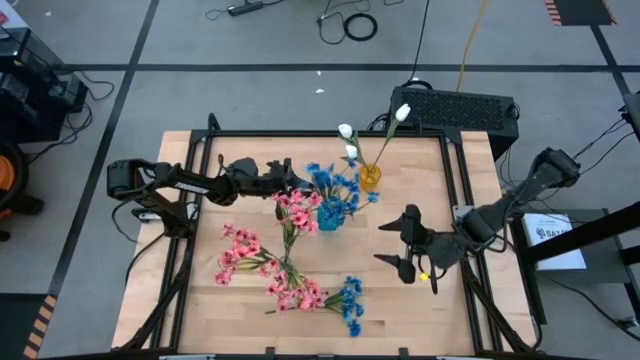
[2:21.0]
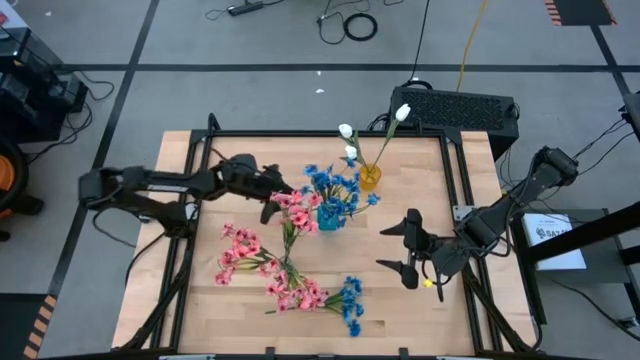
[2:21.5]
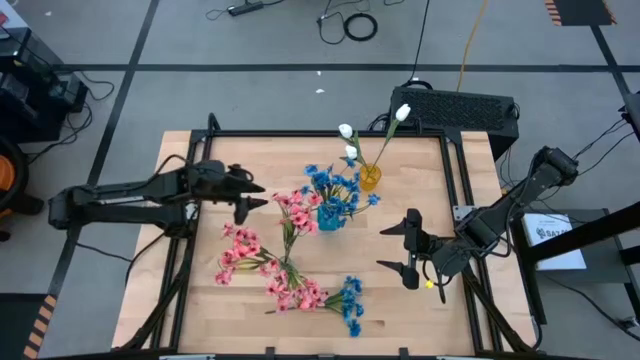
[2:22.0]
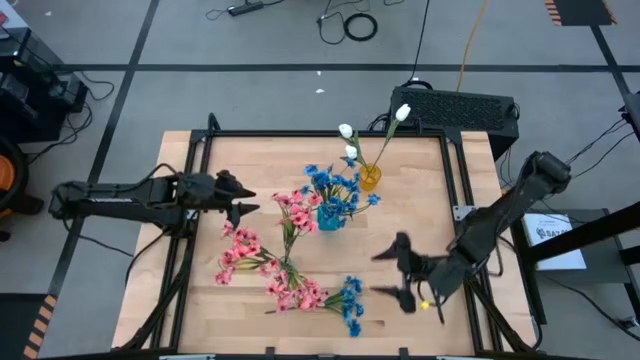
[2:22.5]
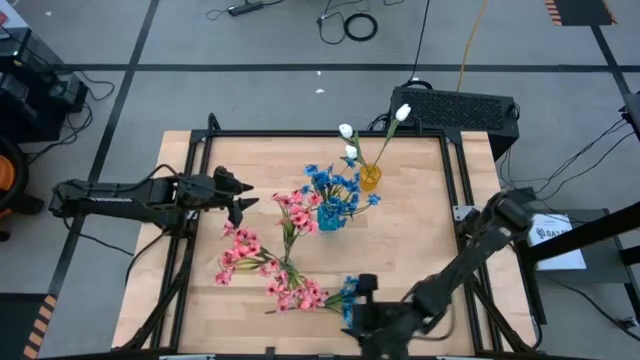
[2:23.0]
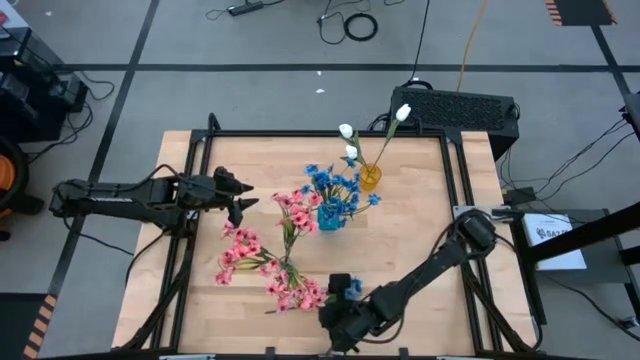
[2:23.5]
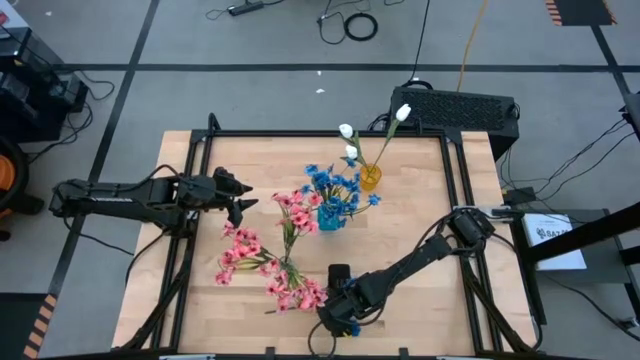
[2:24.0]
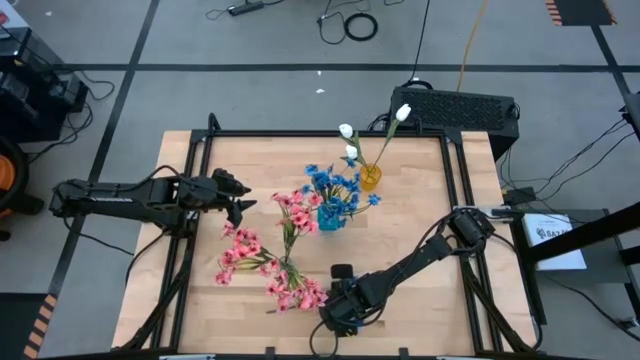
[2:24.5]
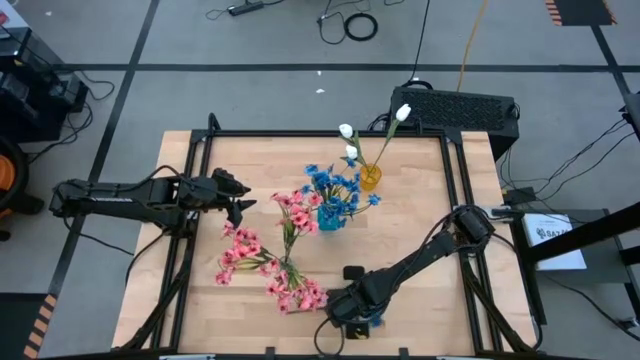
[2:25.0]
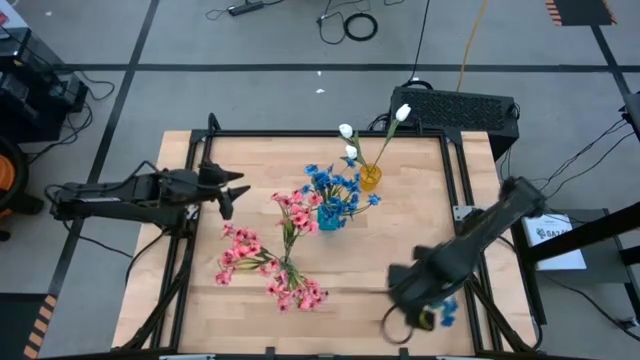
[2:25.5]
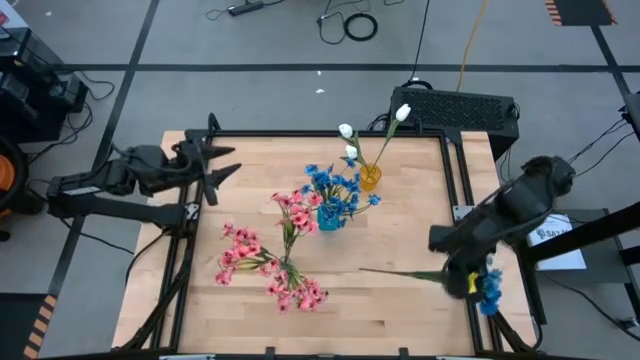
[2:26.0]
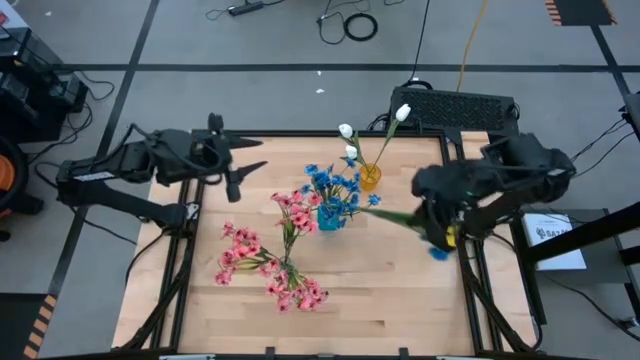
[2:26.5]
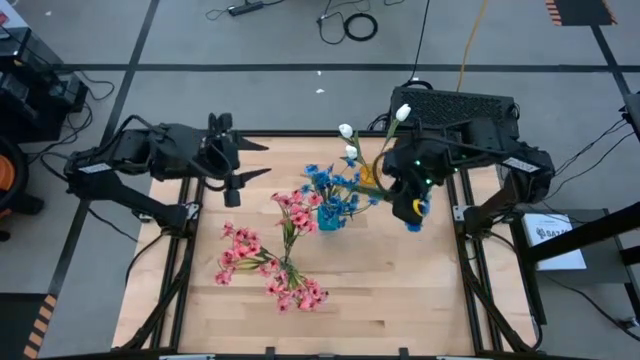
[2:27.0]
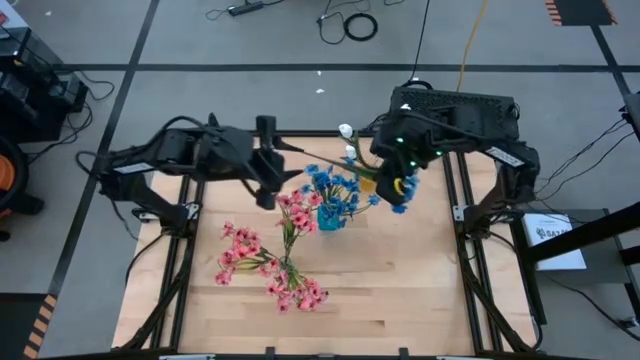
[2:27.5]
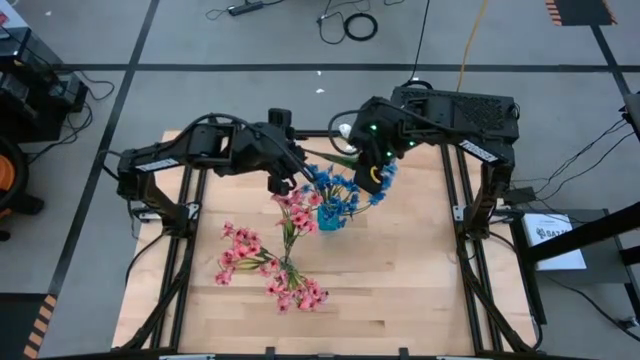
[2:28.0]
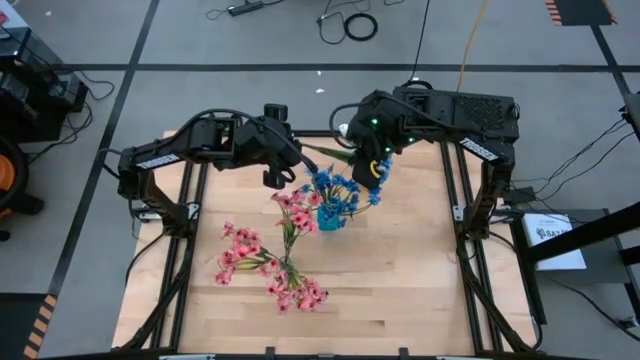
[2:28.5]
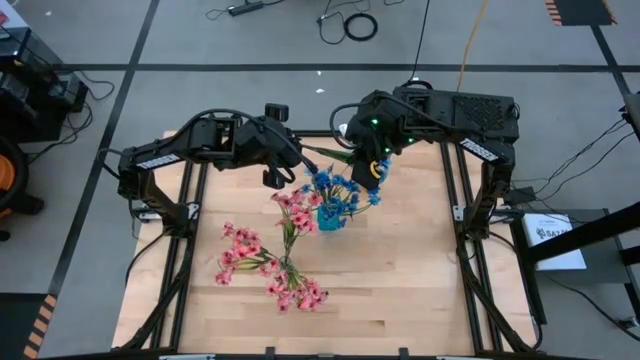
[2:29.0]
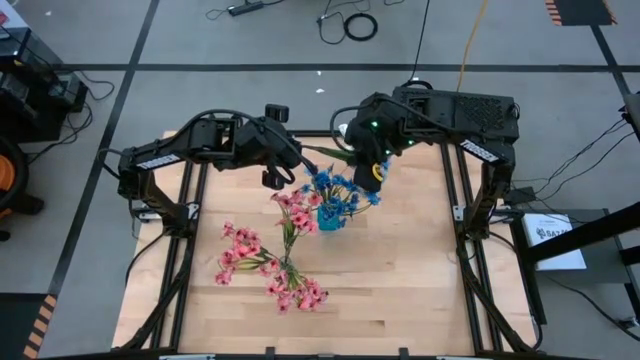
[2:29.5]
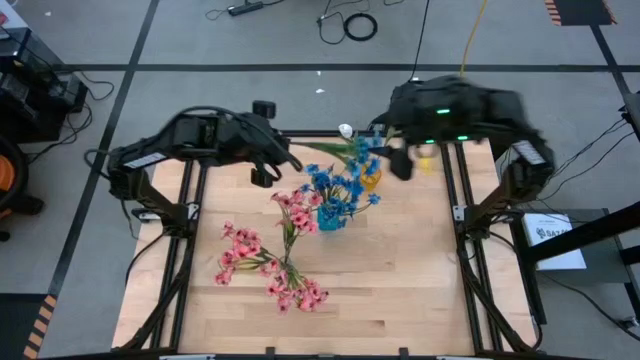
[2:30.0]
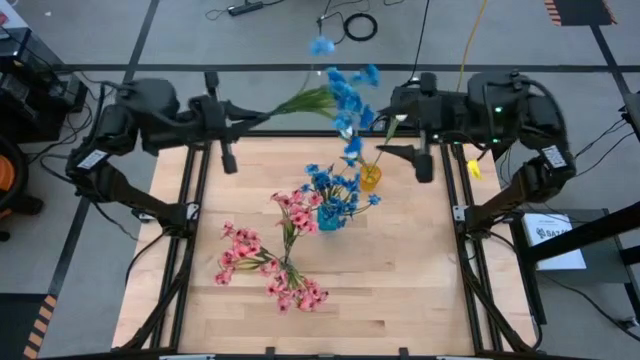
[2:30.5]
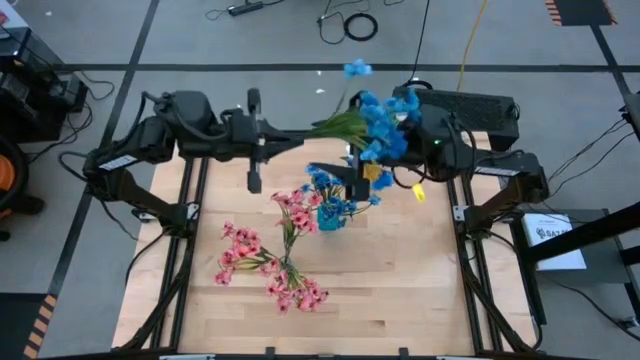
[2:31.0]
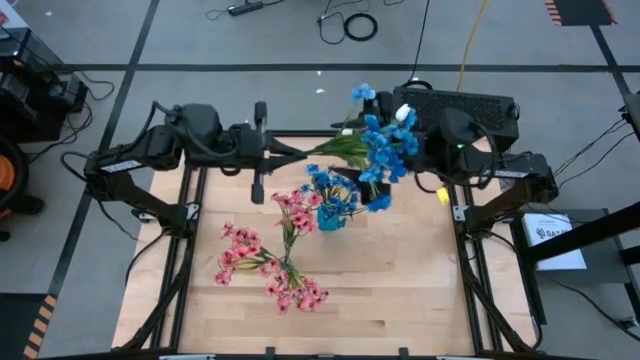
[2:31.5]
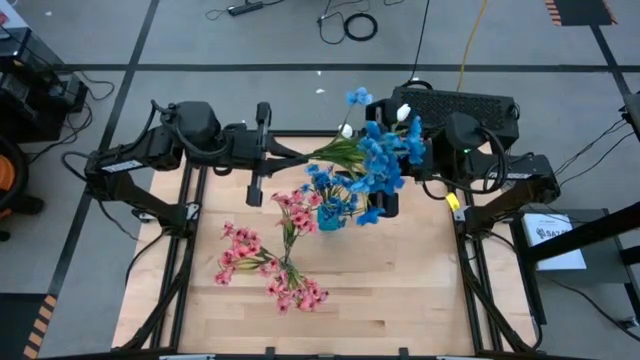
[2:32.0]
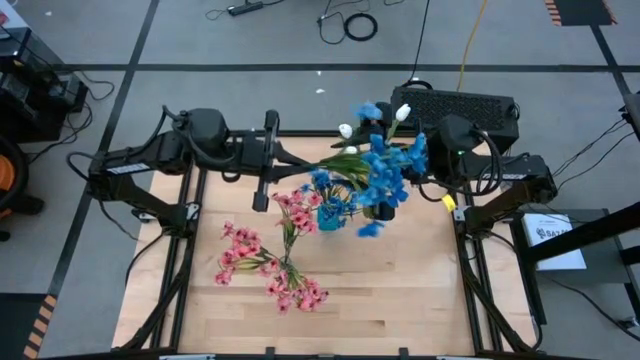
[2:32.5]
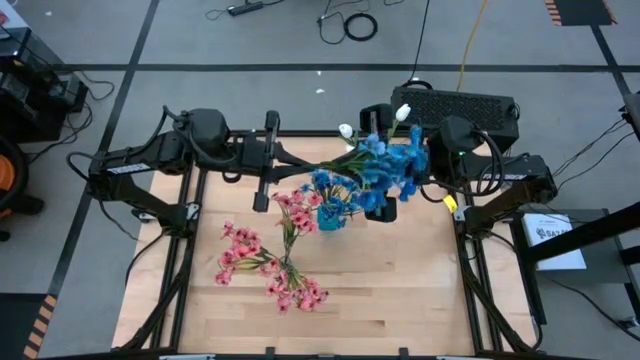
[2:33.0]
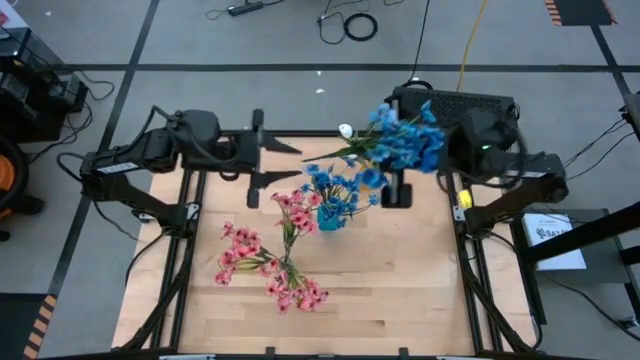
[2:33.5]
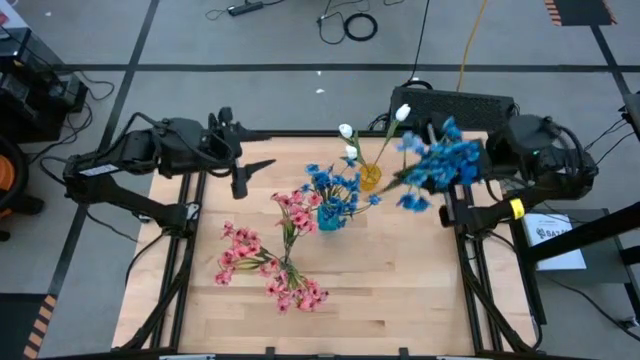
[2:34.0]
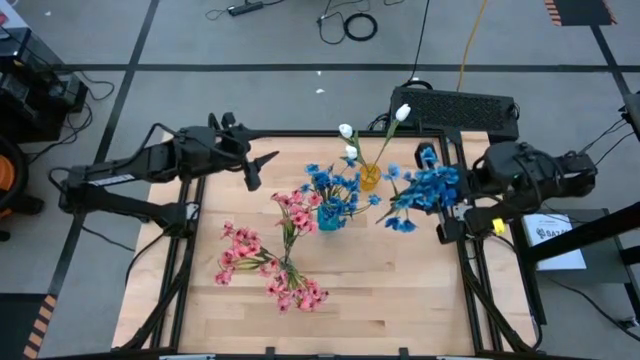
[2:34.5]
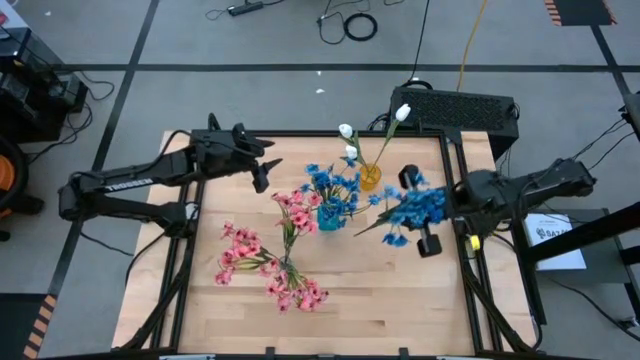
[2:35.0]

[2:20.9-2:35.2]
Task: Sort flowers into vase by color
Put the blue flowers into the blue vase

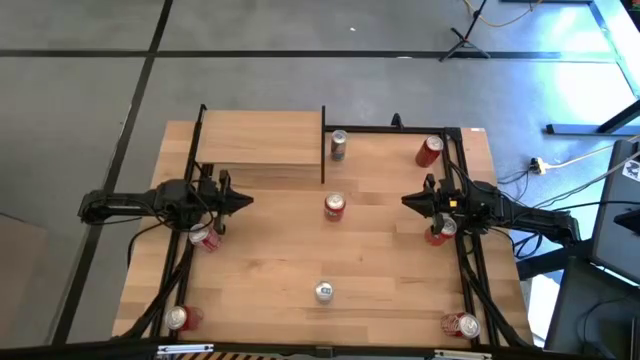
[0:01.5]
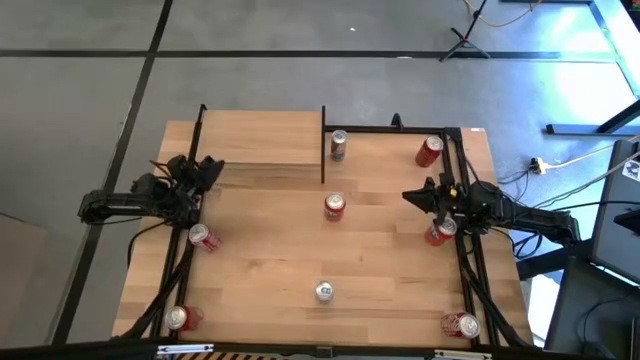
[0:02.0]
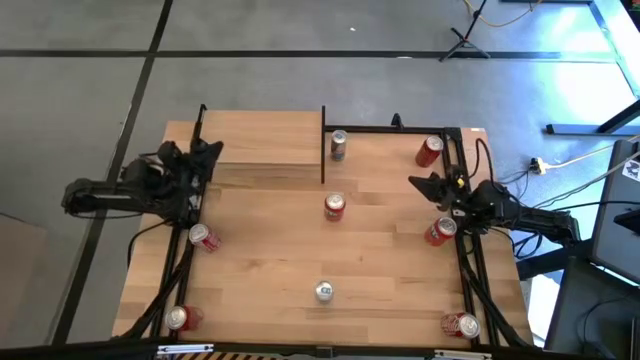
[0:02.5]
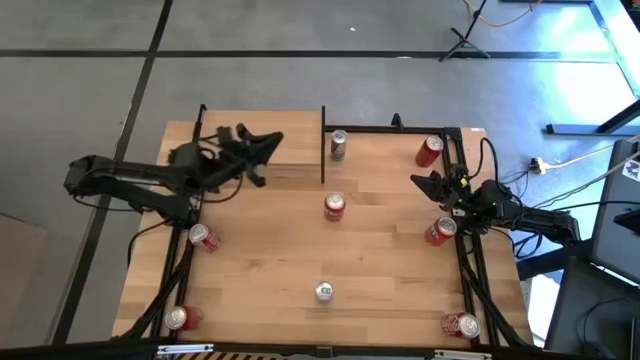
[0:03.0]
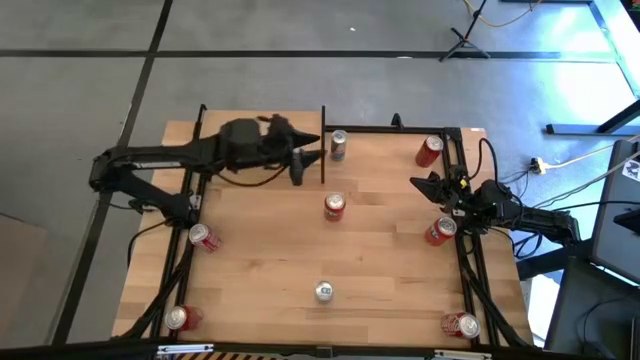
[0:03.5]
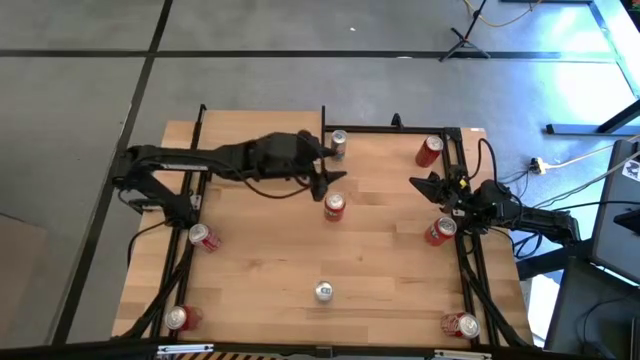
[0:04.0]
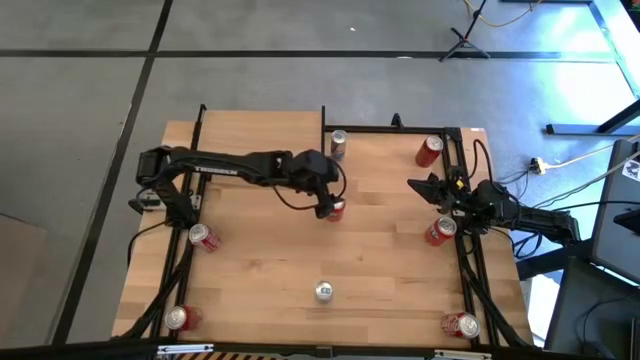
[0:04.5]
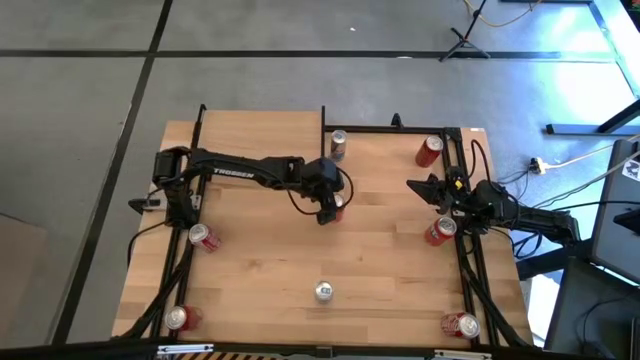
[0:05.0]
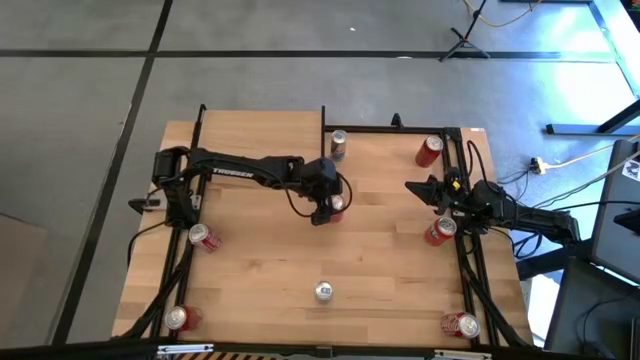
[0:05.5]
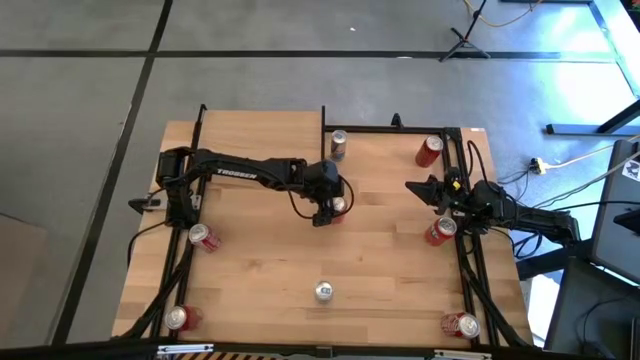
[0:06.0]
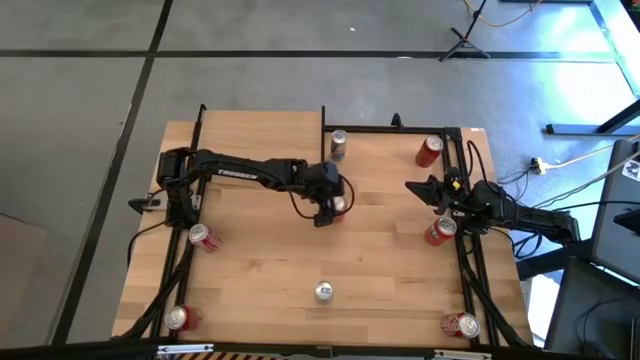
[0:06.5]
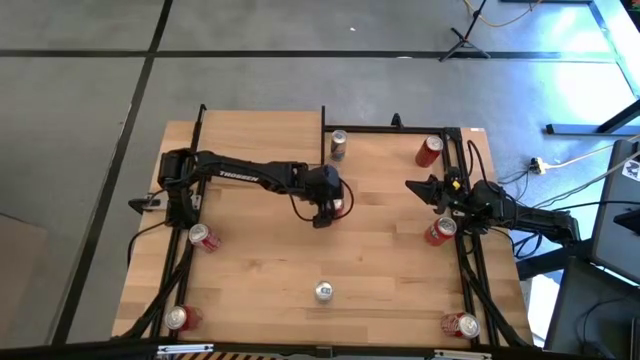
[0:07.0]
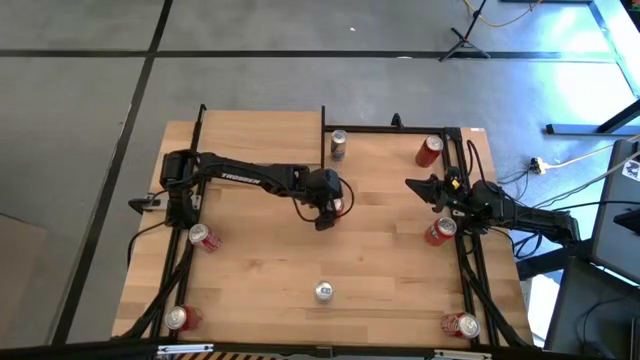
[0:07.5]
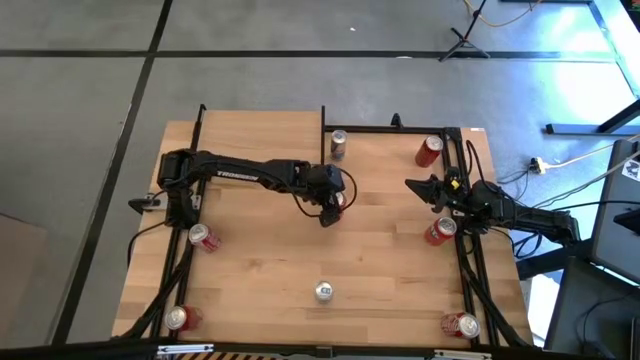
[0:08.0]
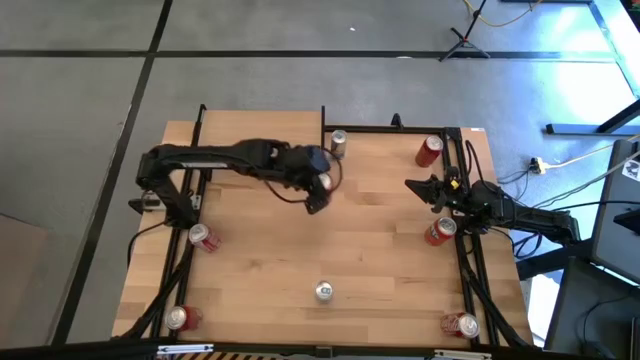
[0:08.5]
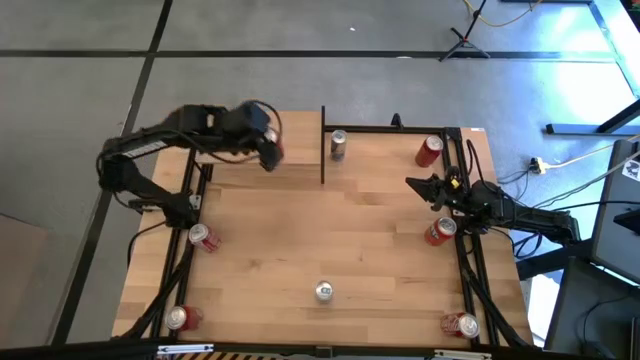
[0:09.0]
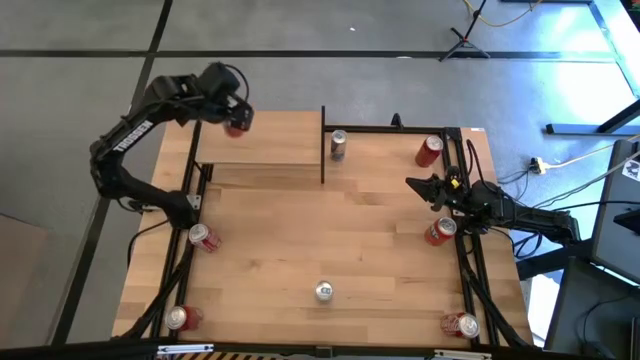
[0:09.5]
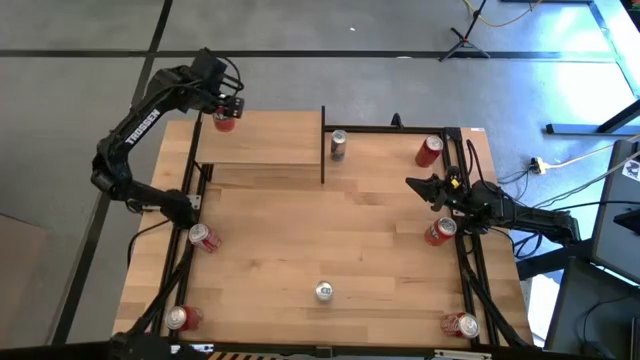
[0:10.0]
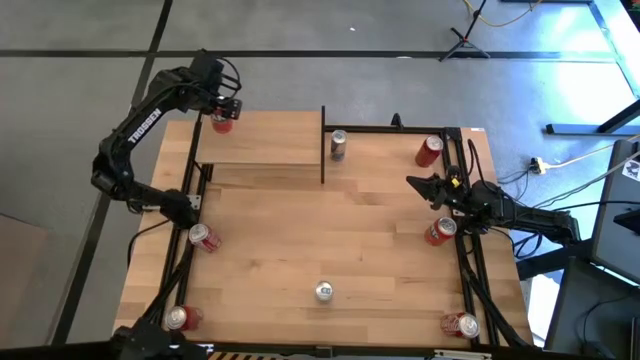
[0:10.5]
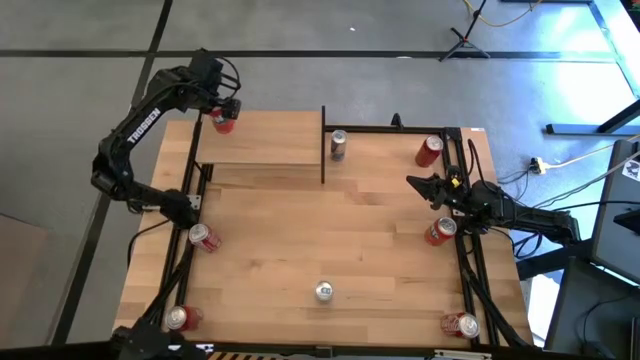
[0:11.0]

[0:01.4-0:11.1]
Task: Place canned beverage on shelf
Put the left red soda can on the shelf
